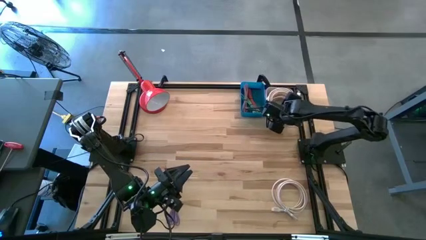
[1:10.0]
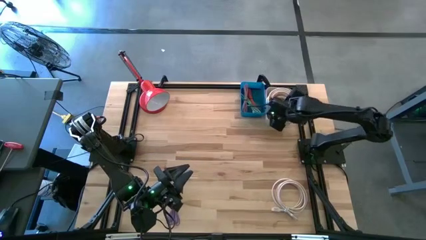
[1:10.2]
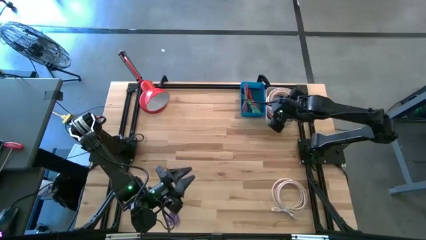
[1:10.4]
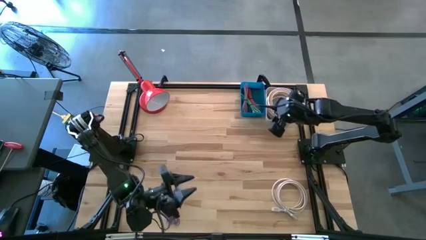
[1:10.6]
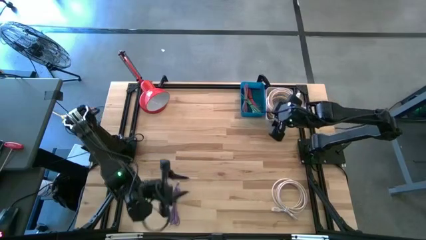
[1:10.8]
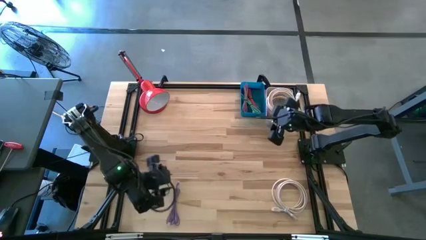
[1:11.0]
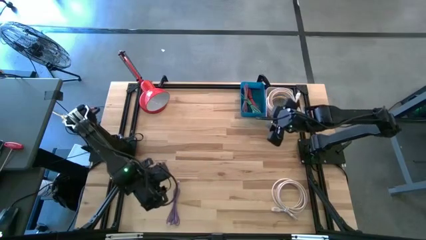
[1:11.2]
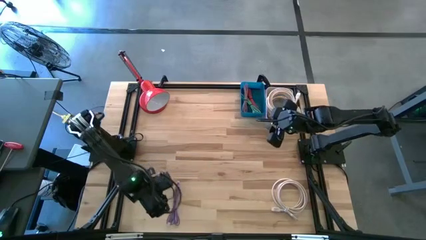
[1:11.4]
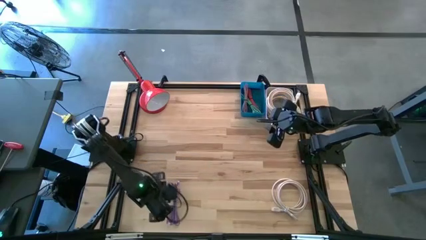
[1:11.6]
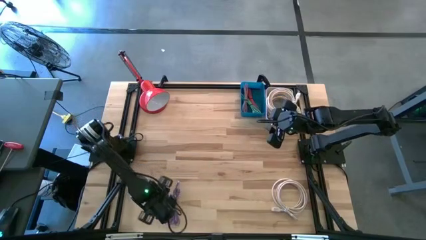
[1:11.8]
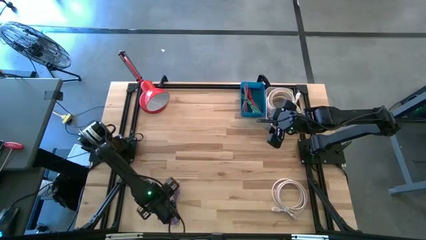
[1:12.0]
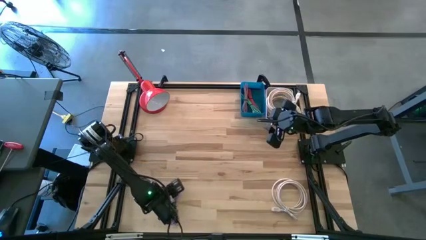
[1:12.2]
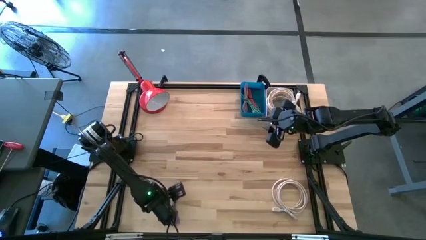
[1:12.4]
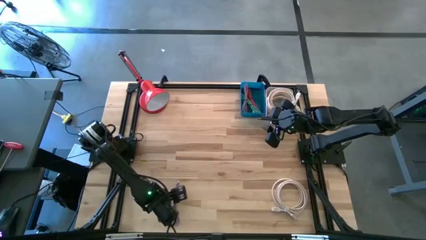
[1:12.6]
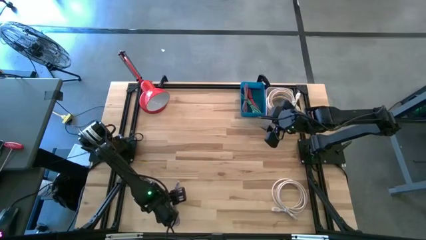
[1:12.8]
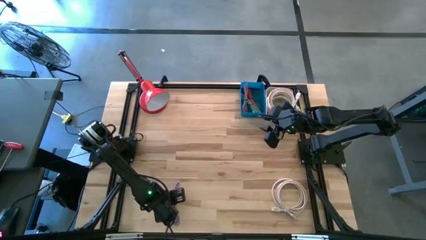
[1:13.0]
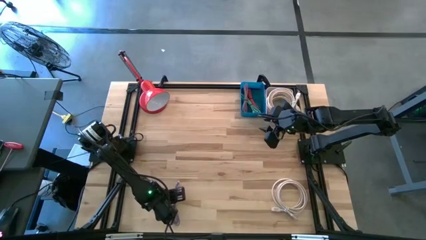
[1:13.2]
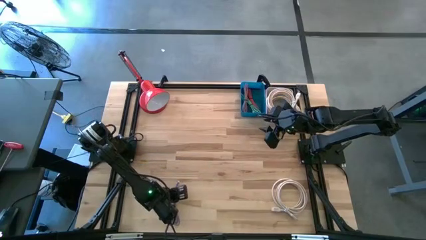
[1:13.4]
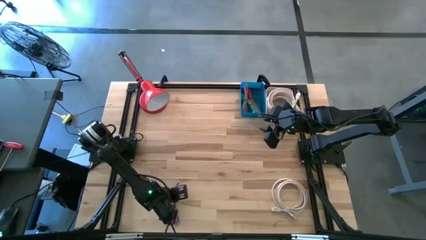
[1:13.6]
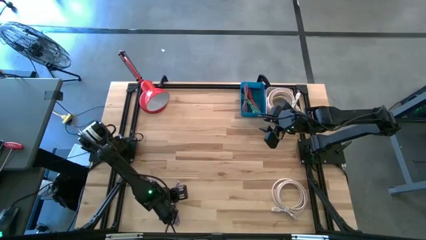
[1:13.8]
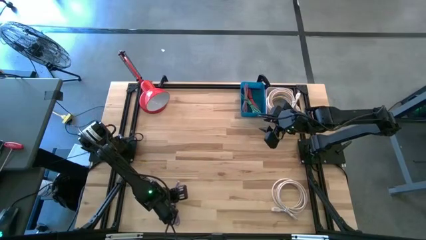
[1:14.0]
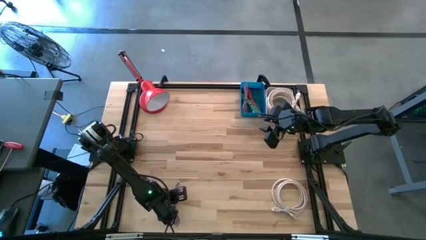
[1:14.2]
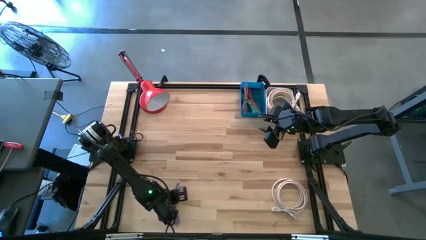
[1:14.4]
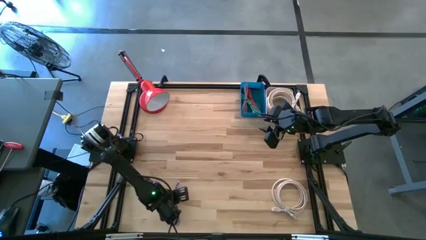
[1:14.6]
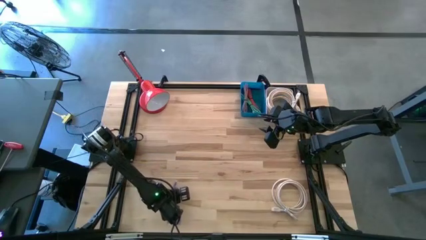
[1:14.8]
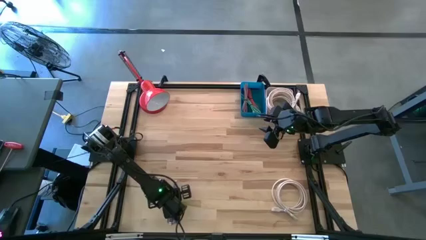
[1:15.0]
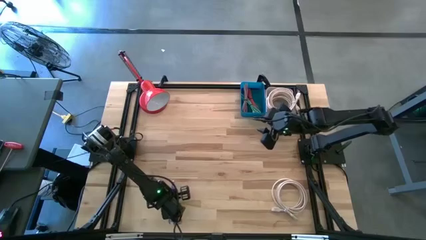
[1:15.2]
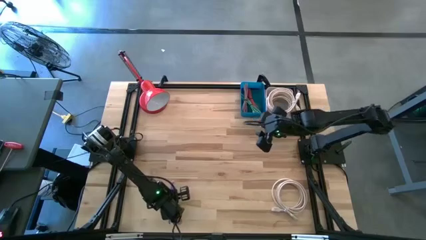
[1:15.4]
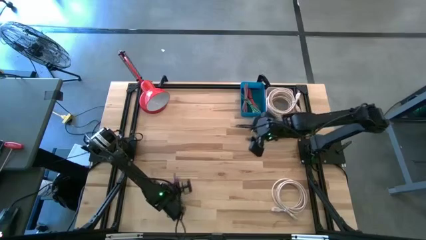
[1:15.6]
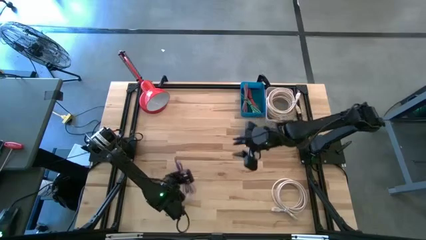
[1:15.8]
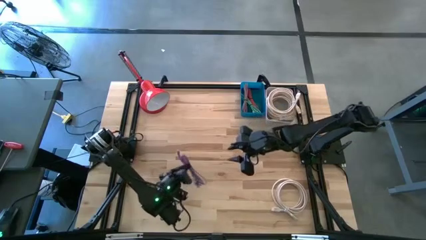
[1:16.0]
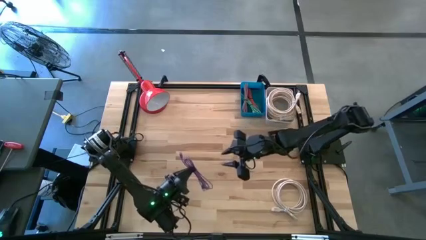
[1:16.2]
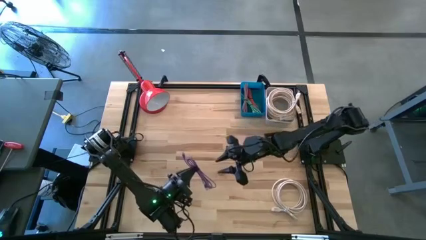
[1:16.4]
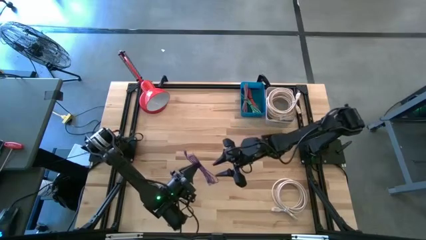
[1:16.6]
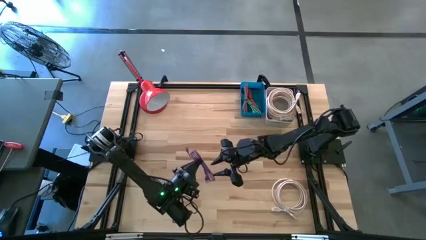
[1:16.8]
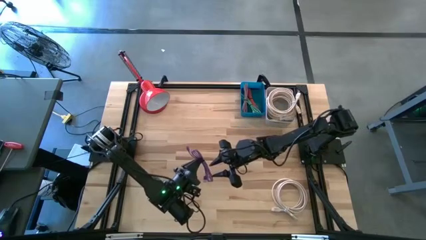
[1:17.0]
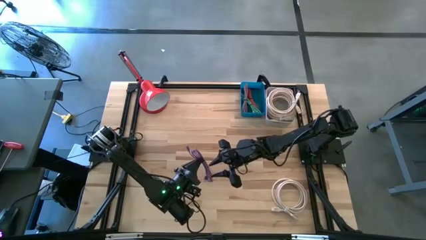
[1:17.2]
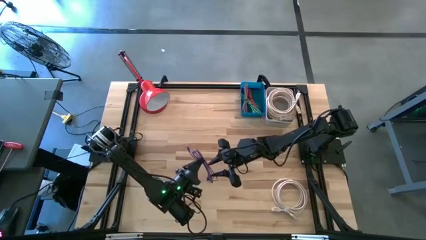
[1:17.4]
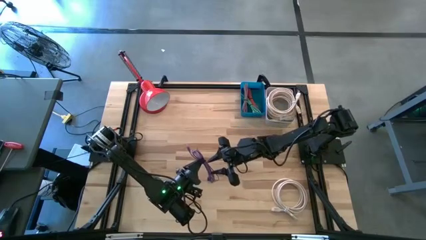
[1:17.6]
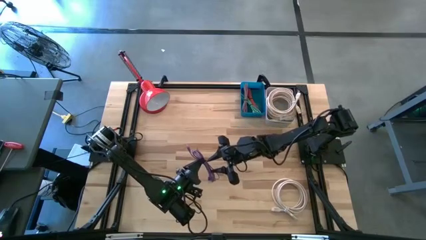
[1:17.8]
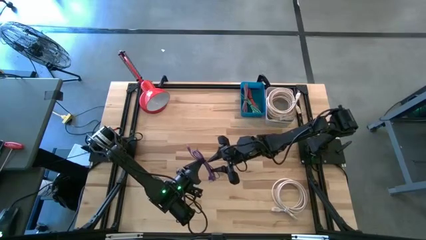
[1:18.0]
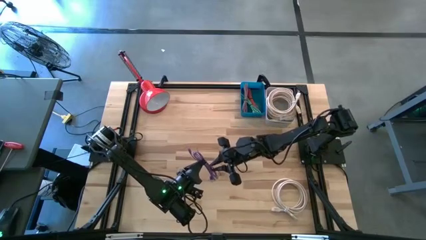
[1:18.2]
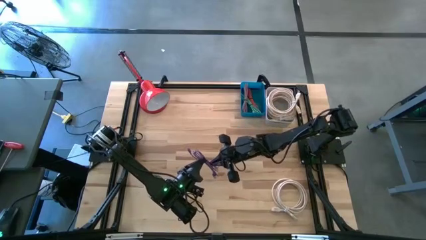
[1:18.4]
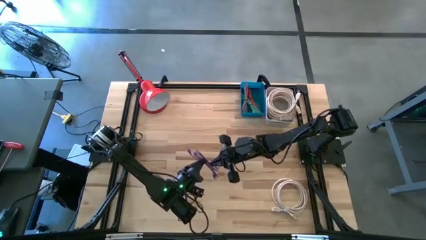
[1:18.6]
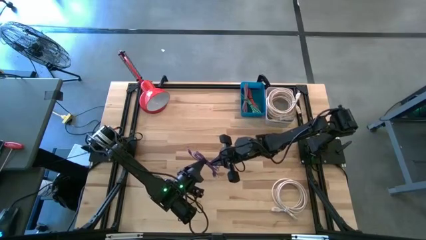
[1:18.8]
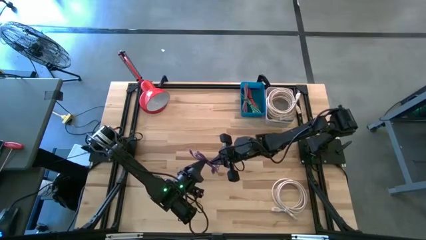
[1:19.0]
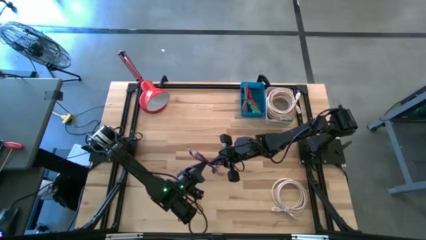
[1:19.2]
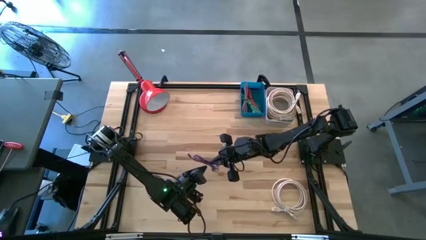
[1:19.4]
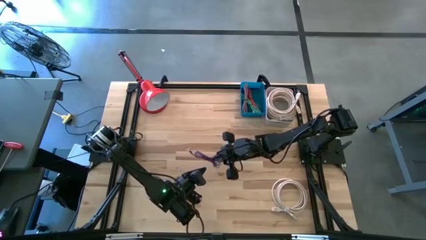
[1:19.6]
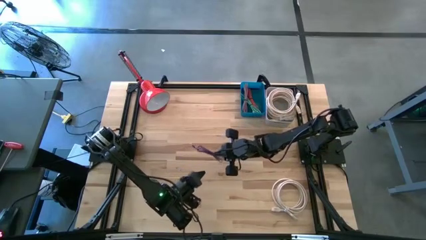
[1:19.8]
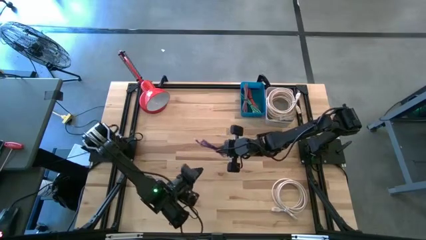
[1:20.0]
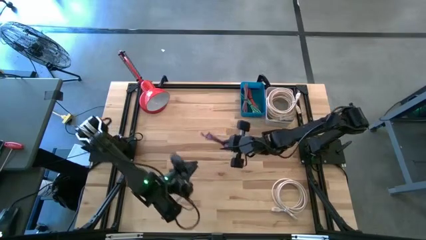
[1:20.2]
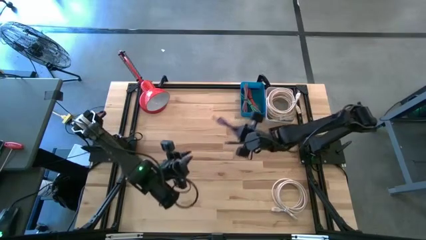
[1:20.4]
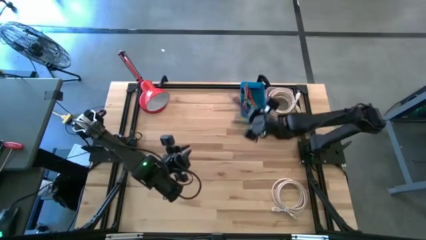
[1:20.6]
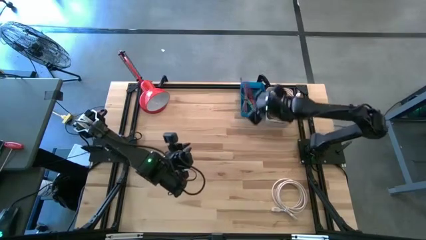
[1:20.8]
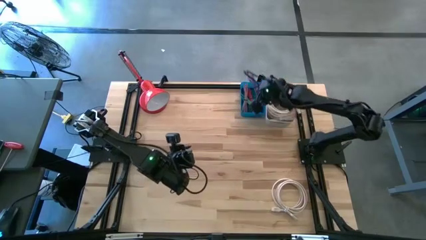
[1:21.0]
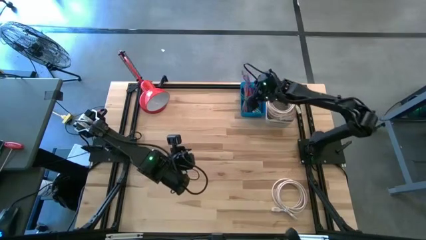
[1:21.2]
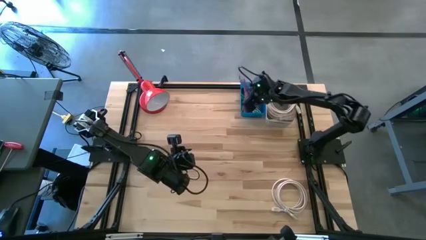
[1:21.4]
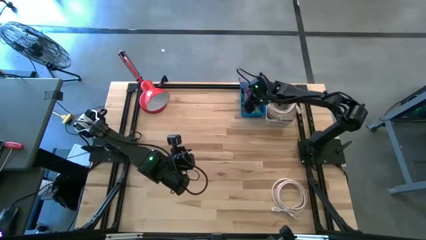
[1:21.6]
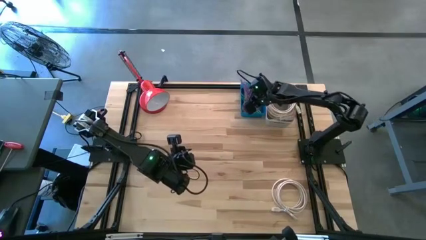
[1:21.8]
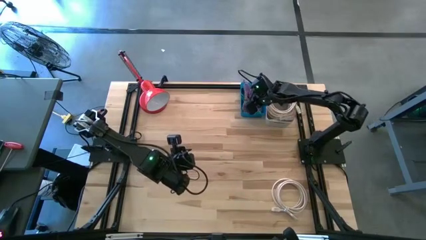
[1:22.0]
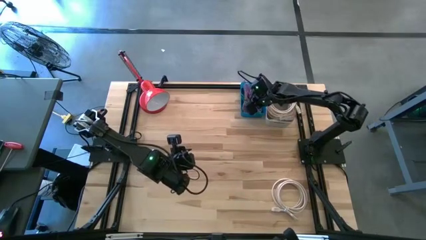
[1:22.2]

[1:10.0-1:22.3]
Task: Pick & Place USB Port
Put the purple charger cable into the blue bin

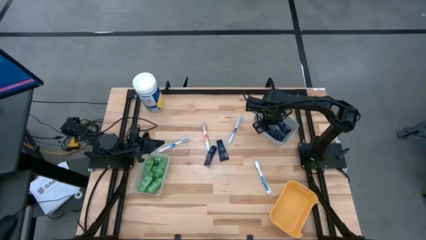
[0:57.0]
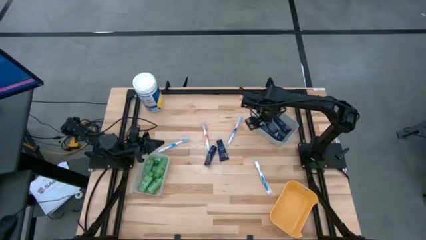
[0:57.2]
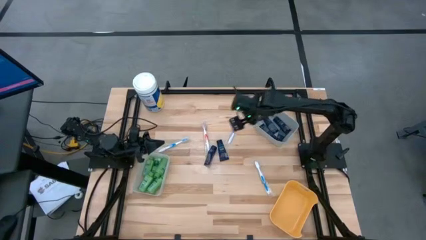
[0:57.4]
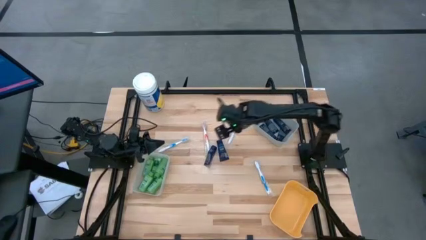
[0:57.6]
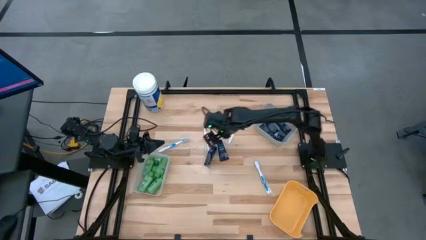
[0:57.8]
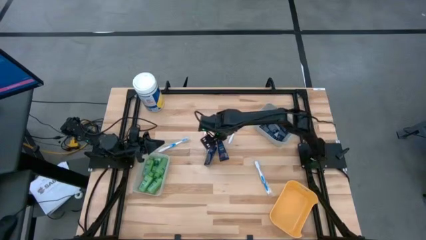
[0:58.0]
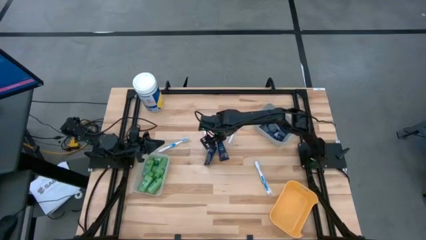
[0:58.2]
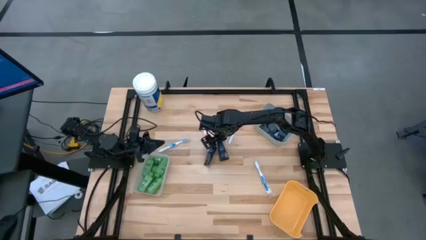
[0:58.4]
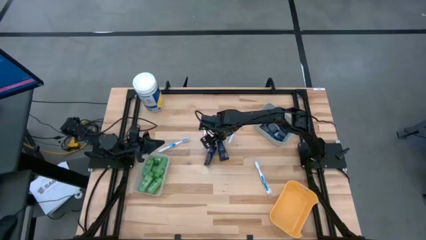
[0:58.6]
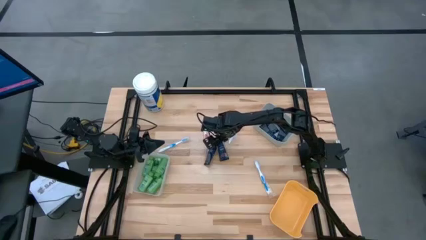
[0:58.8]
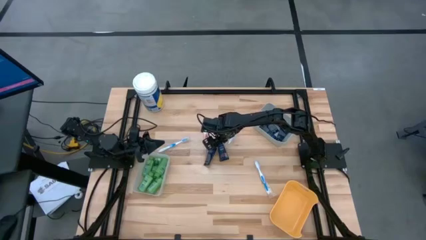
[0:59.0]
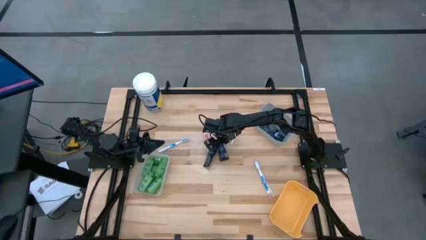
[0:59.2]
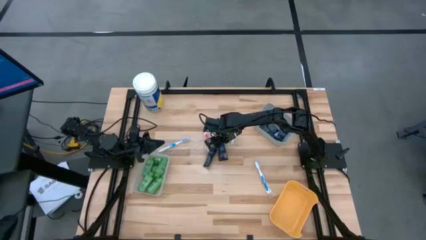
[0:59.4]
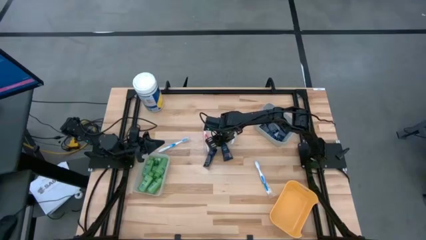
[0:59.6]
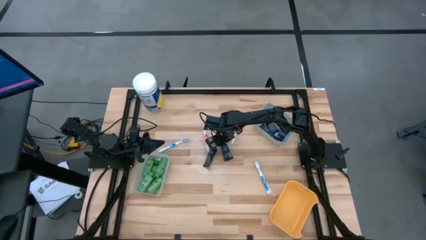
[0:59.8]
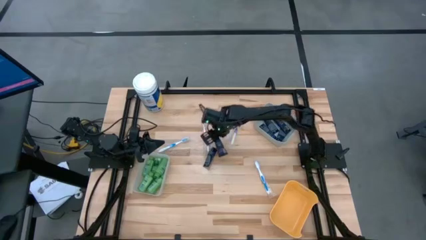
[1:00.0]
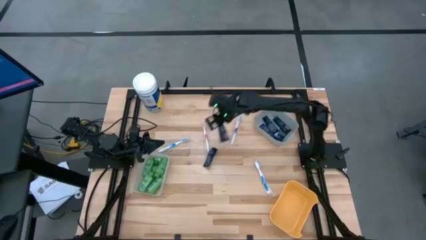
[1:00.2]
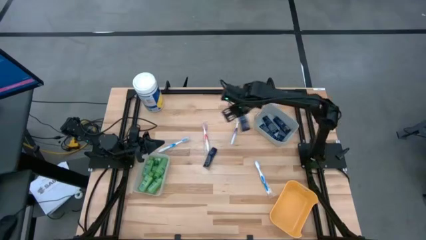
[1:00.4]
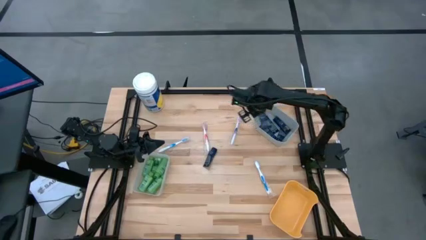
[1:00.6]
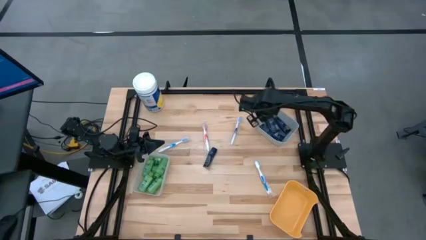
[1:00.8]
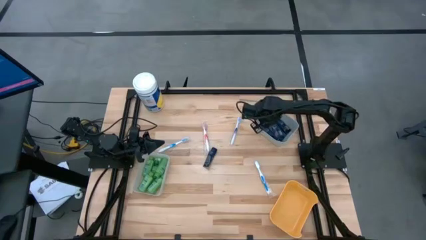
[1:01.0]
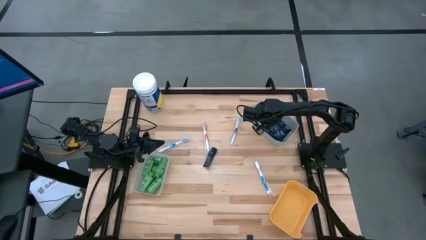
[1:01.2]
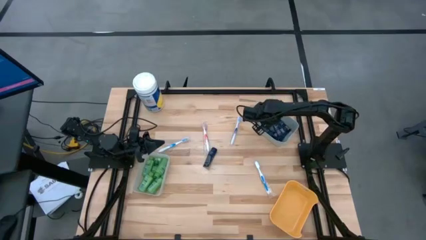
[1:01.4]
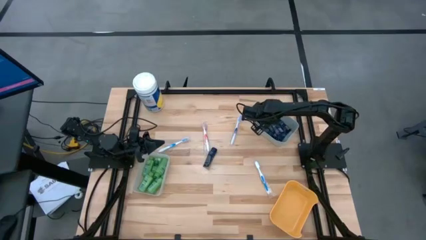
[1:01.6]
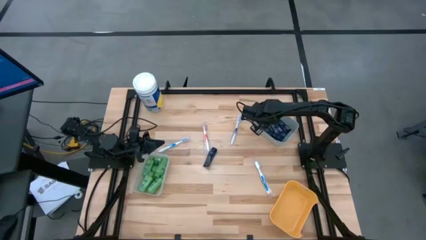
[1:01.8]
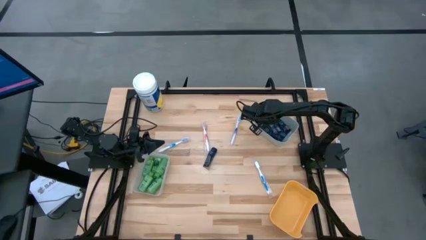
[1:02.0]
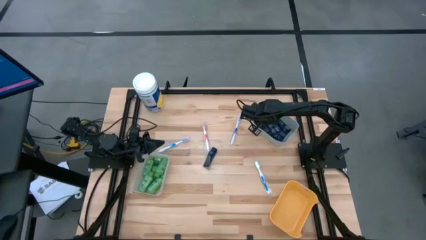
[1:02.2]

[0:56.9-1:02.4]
Task: Pick & Place Travel size toiletries
Put the blue shave cream tube into the gray bin
